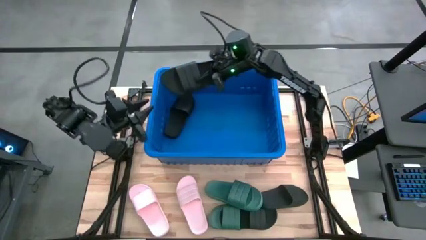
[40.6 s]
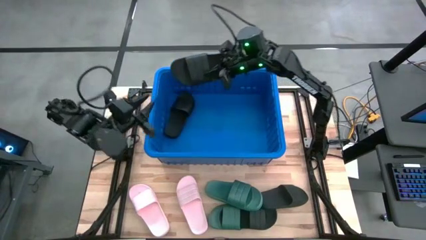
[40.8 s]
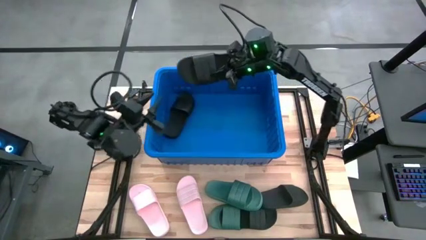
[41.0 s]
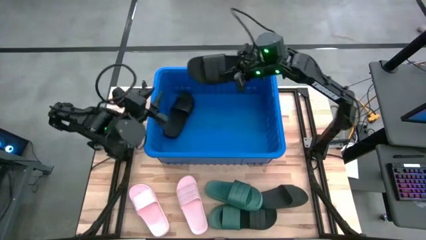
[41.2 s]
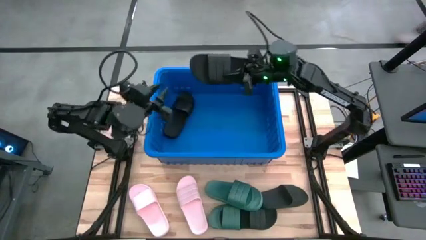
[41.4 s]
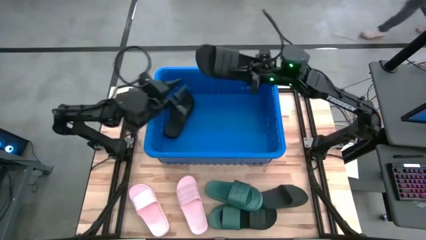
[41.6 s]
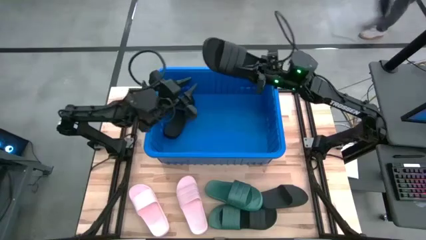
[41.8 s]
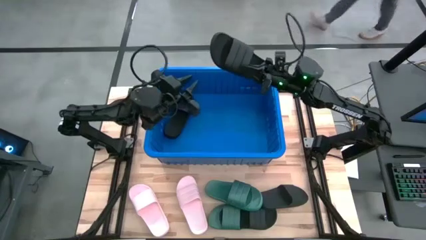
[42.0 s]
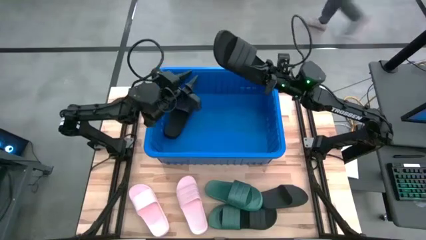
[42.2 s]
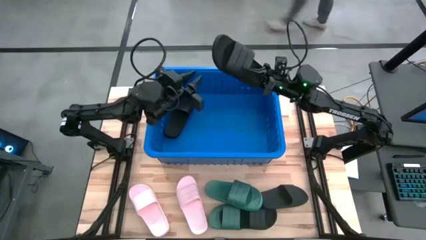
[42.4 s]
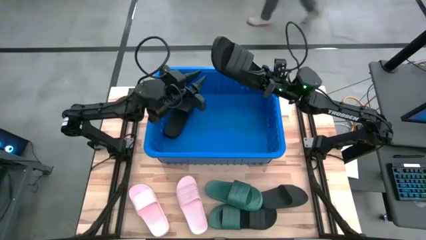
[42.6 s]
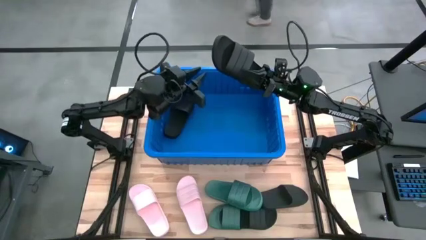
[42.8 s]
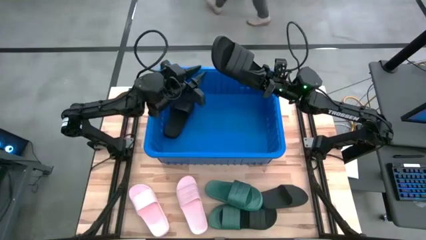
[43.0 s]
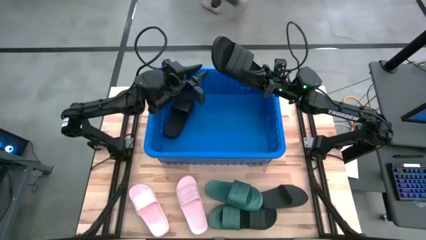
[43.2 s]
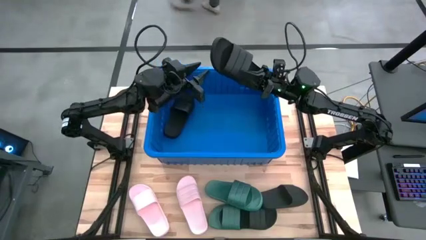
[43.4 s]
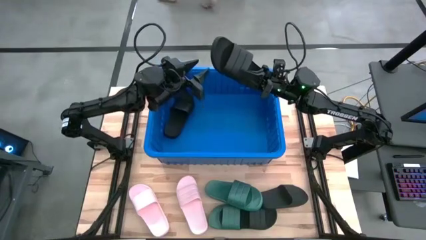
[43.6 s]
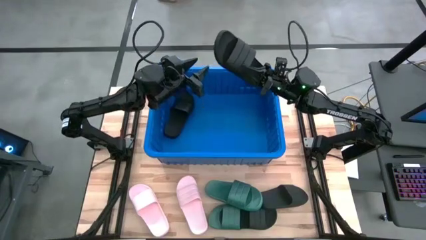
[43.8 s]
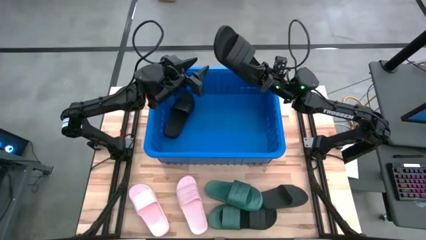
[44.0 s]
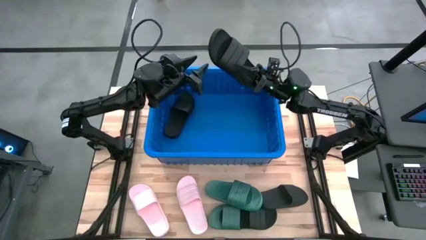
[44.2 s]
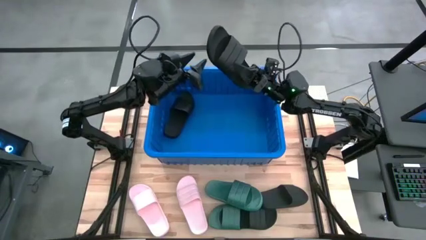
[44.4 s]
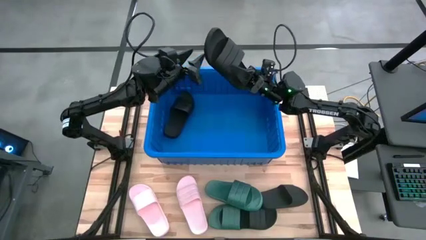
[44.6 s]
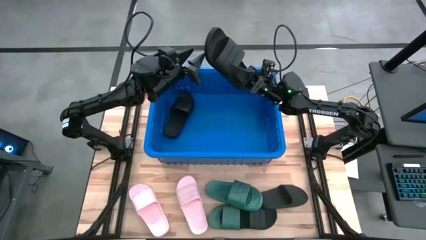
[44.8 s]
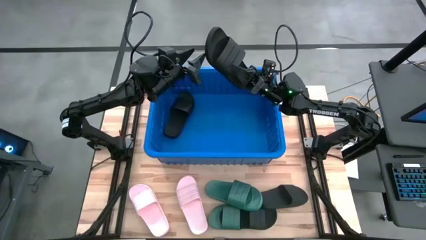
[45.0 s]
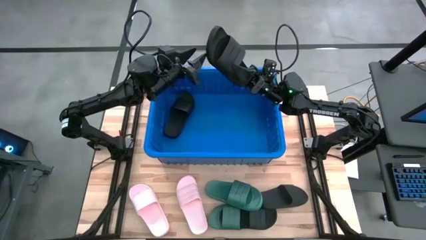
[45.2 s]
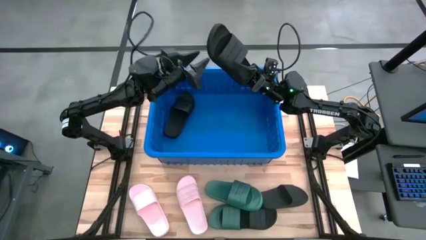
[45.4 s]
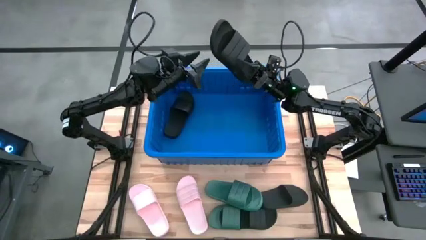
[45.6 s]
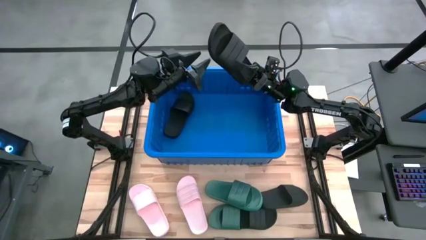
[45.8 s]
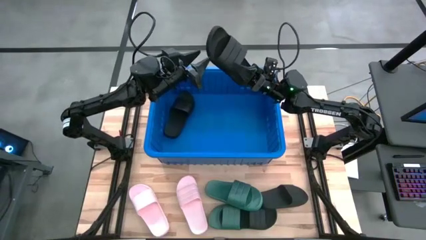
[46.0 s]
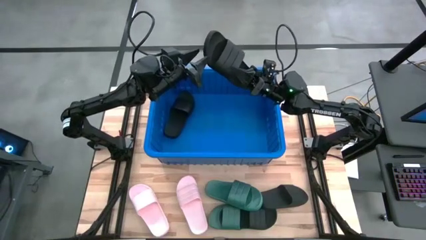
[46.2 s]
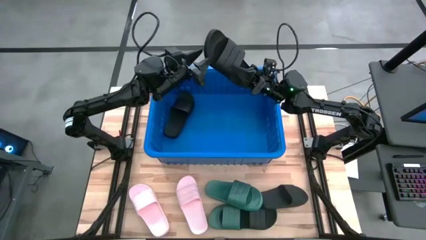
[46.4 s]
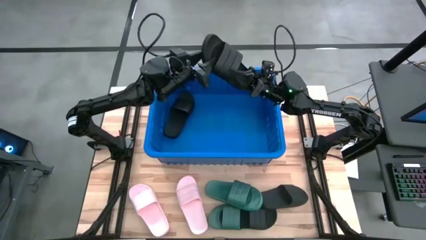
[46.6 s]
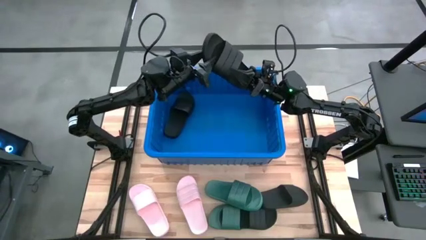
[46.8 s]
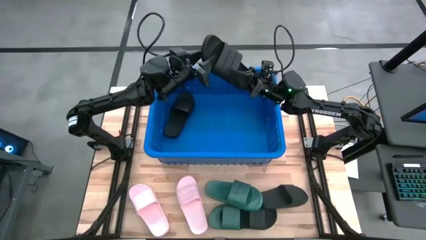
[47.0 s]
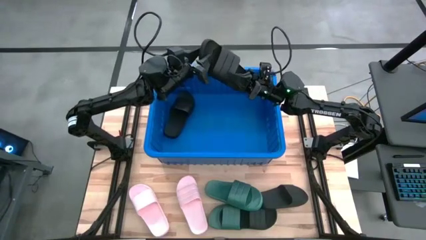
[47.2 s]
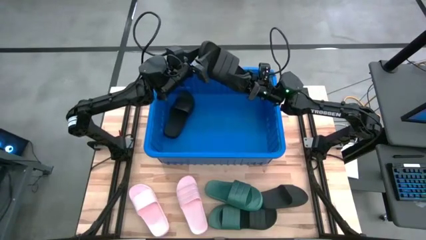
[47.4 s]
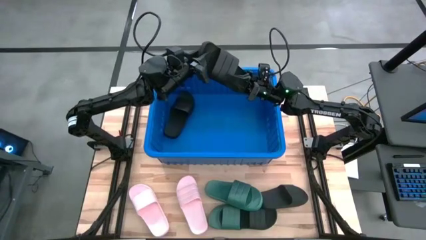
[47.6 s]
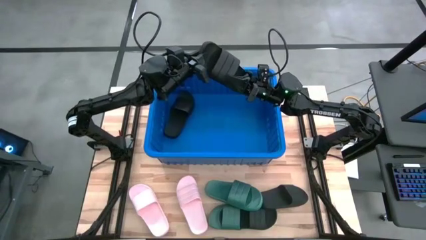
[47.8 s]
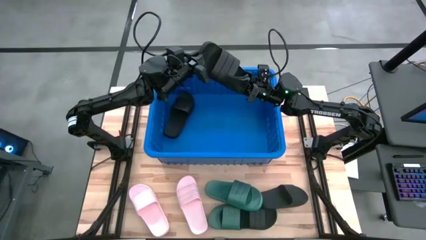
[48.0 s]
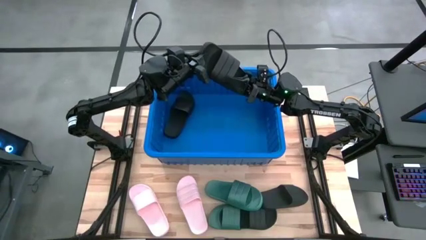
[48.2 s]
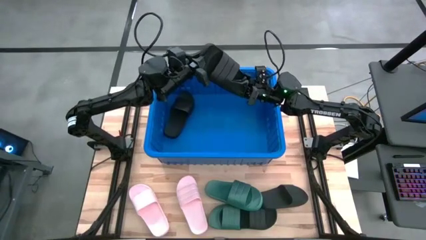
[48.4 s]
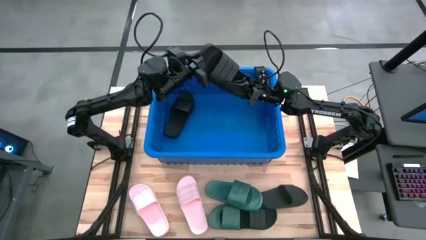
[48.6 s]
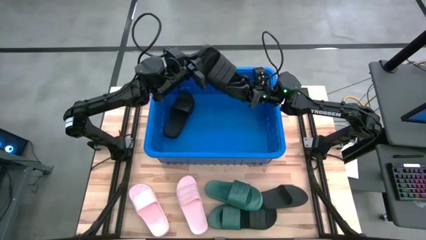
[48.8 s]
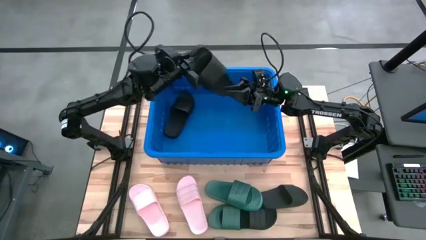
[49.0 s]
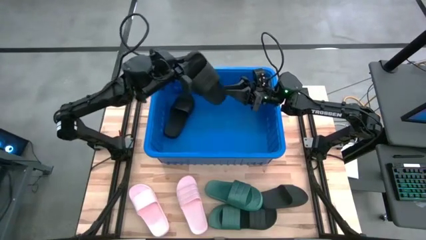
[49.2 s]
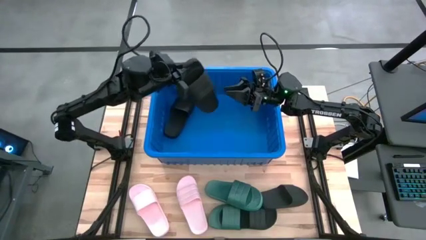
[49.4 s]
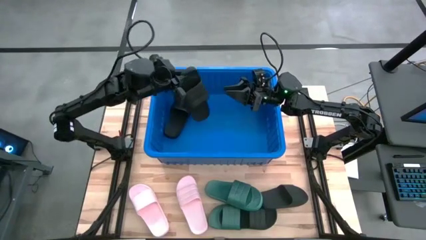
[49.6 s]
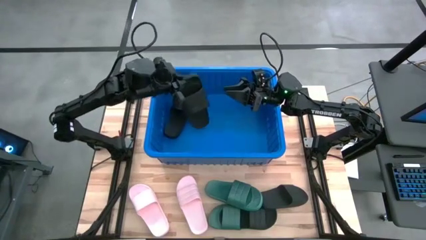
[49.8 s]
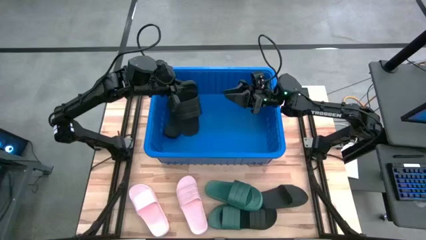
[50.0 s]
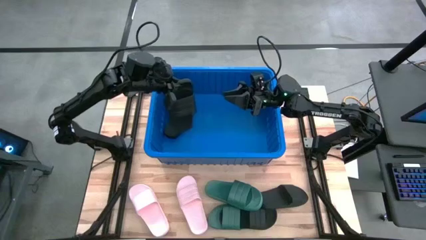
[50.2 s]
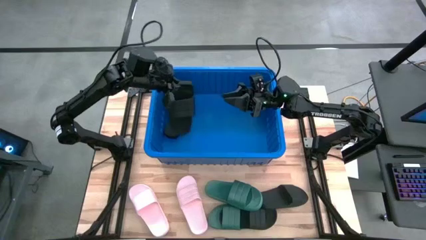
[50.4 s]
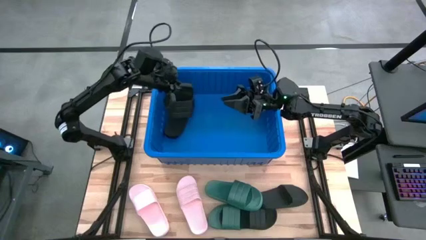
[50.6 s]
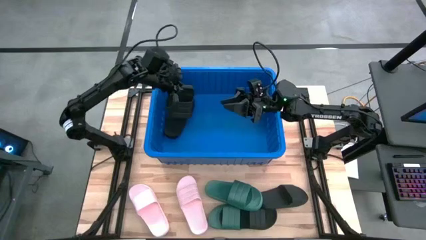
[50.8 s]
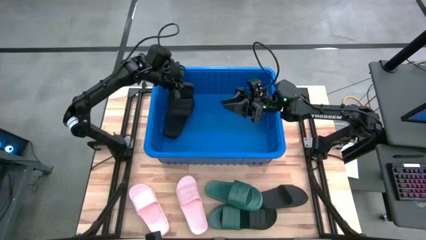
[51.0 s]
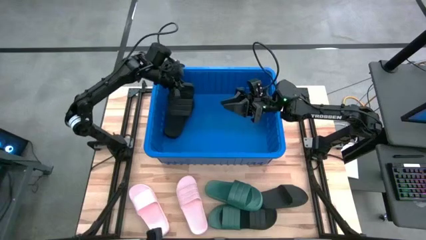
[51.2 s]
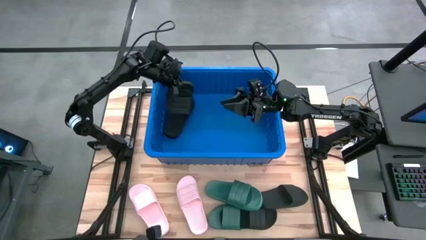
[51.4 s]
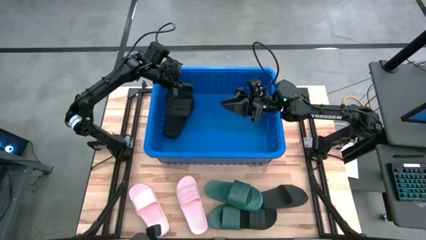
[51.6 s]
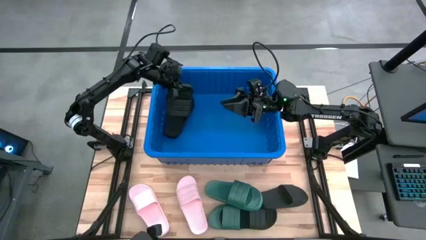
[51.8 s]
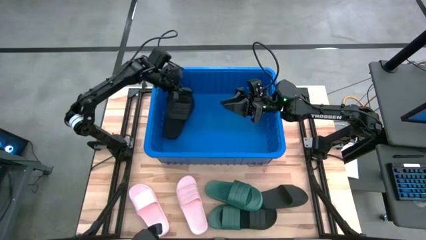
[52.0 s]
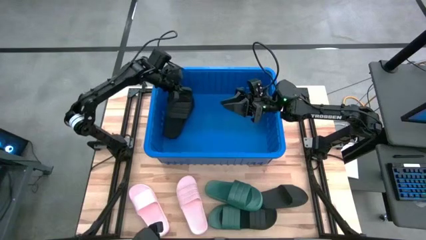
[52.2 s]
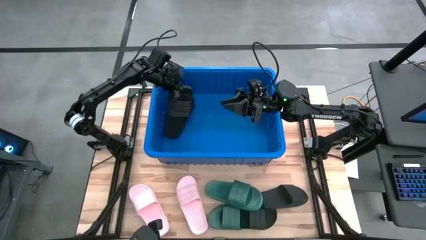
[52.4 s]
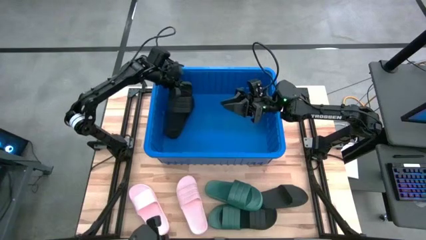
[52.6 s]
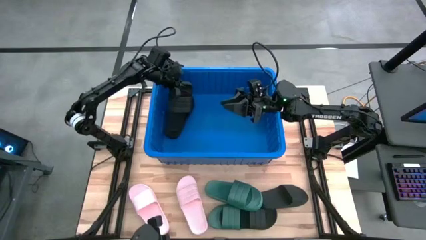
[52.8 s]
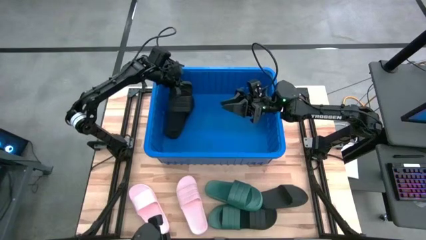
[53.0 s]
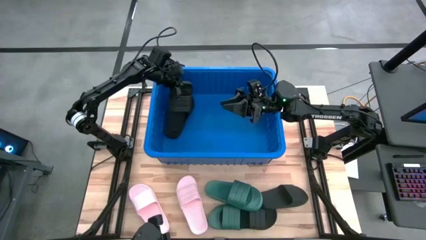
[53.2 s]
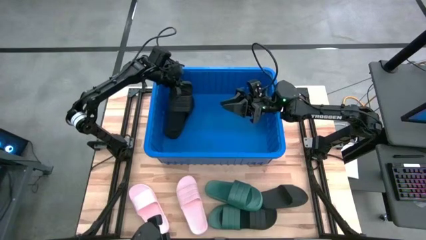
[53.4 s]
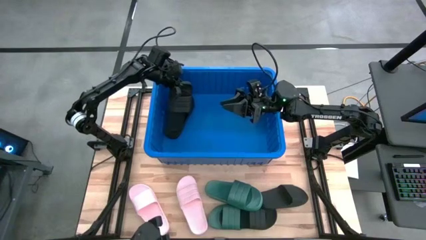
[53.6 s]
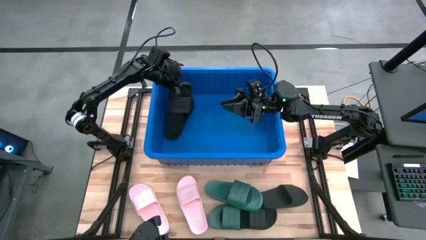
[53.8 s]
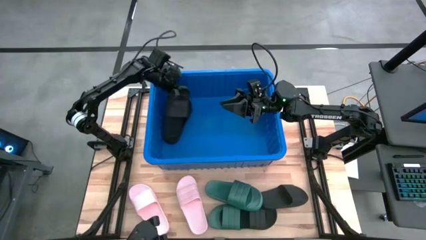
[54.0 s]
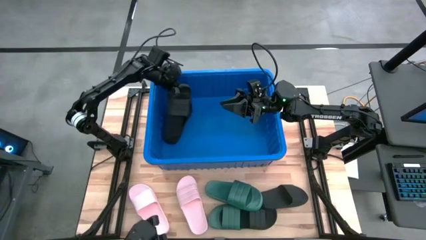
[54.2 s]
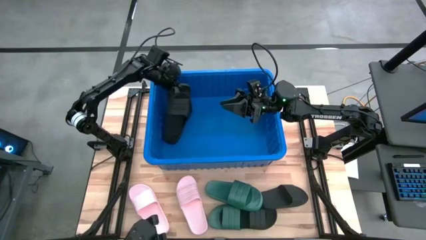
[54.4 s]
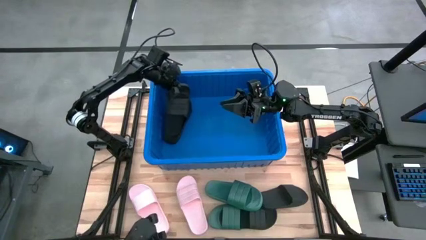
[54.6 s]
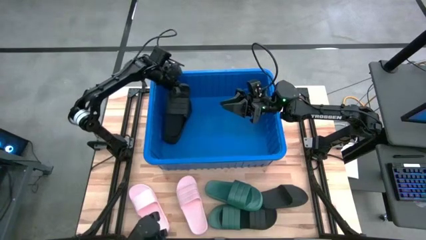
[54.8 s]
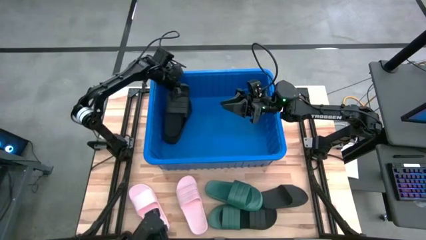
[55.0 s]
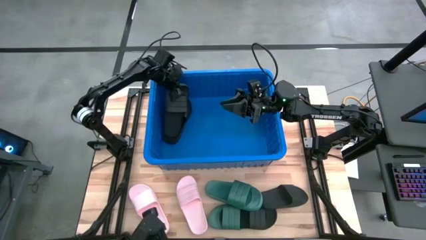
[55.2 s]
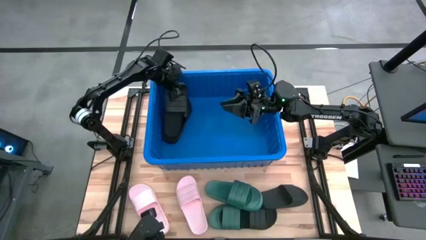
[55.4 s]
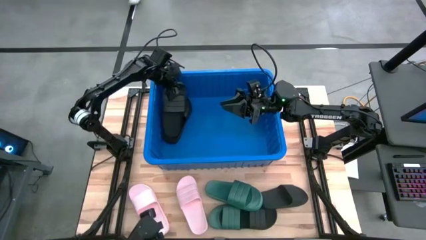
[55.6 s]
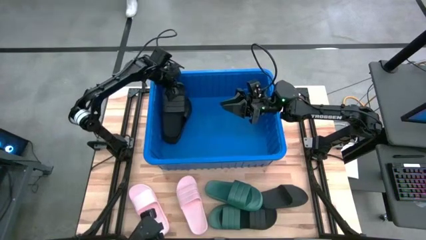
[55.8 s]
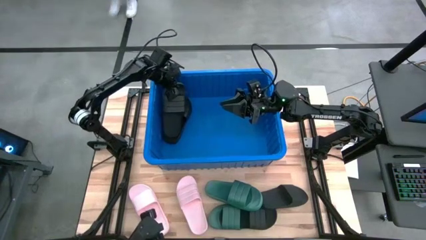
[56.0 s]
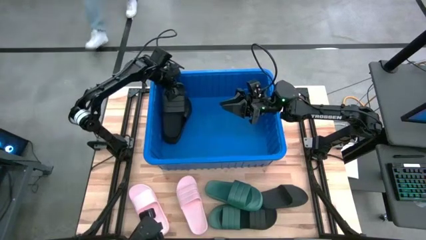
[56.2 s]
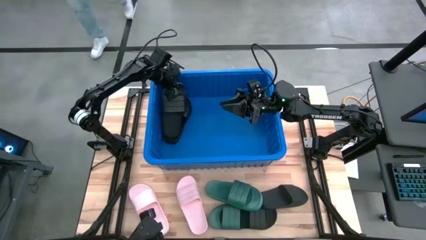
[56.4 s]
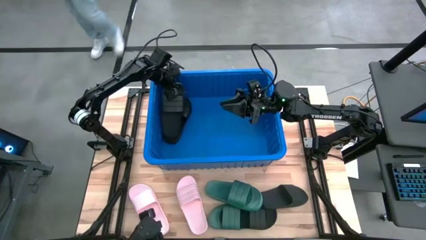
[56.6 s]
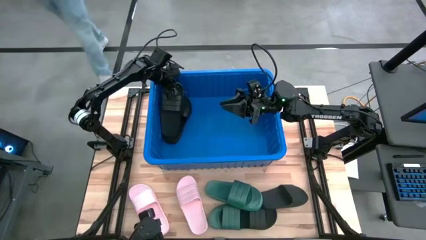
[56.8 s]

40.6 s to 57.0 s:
Task: Pick and place slides into bin
Put the black slipper into the blue bin
